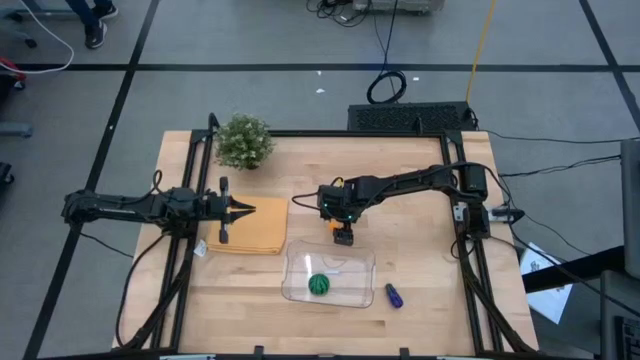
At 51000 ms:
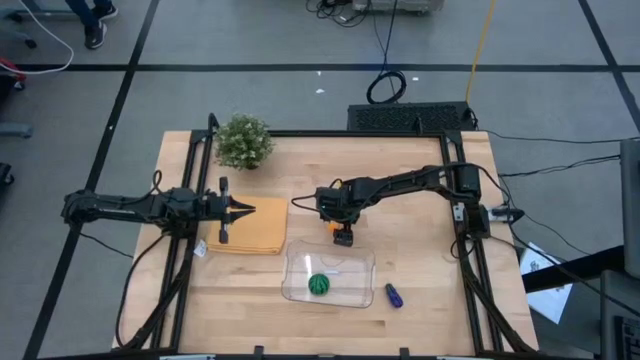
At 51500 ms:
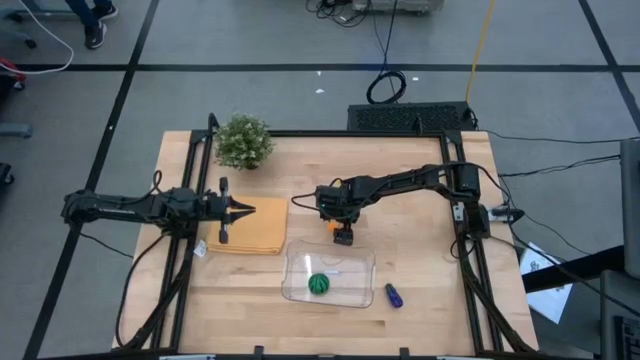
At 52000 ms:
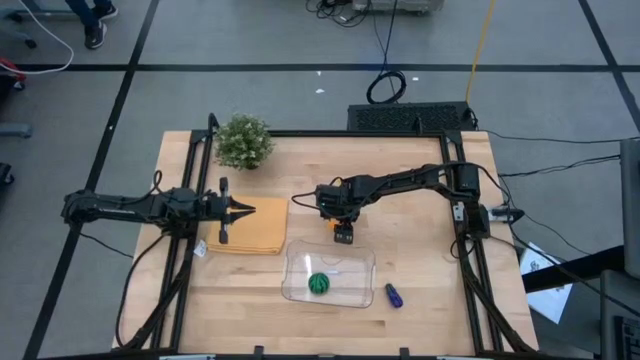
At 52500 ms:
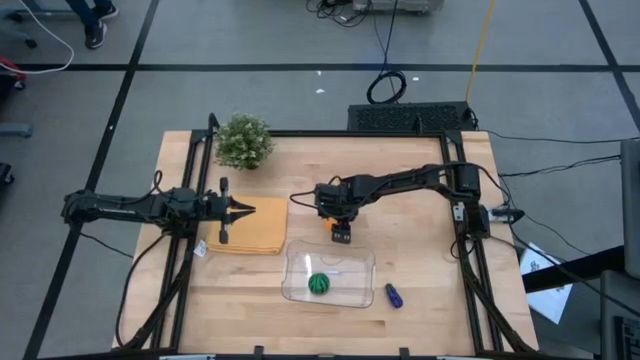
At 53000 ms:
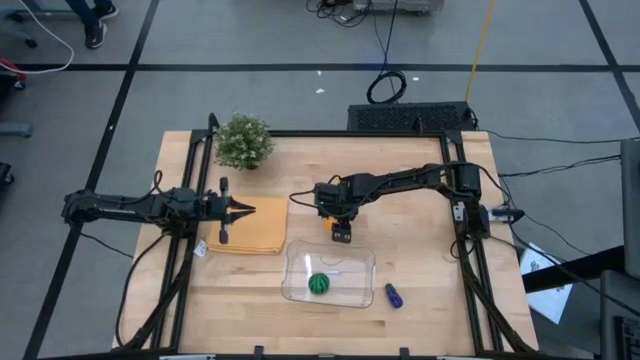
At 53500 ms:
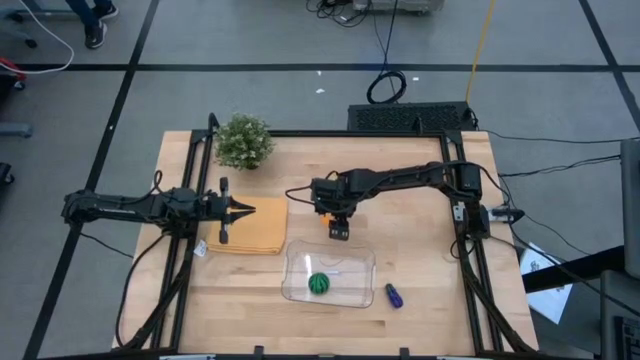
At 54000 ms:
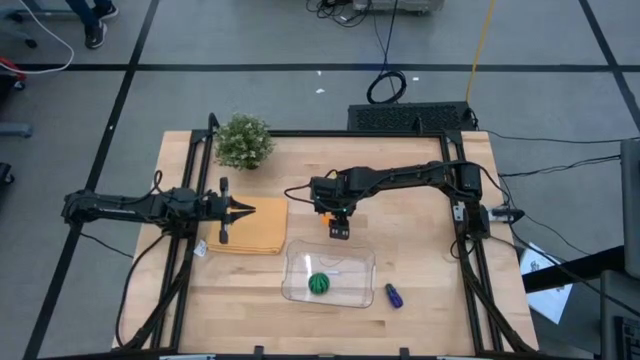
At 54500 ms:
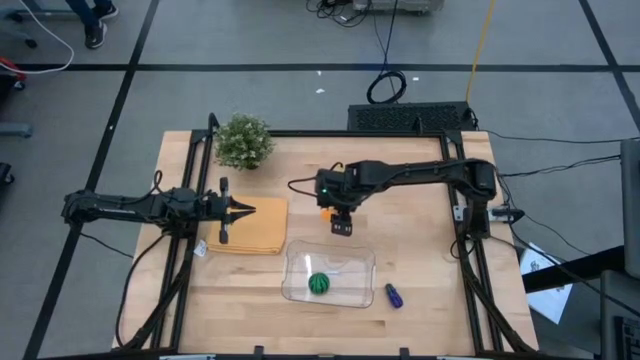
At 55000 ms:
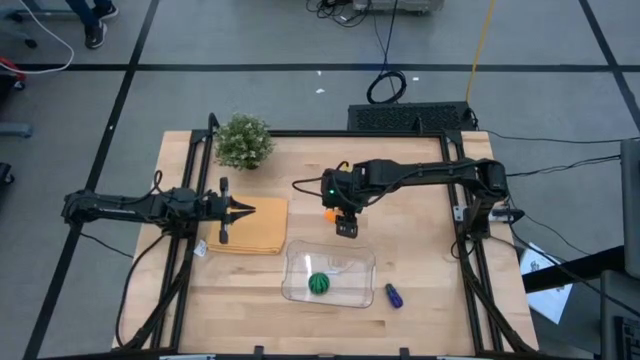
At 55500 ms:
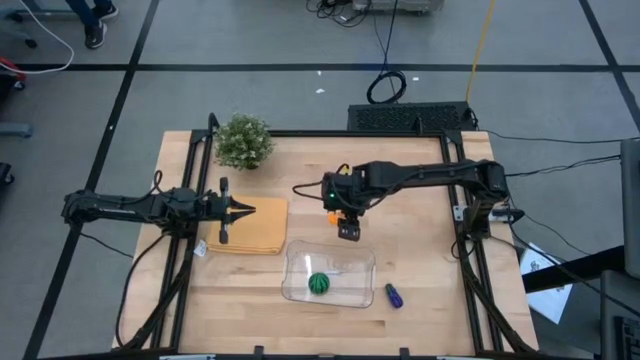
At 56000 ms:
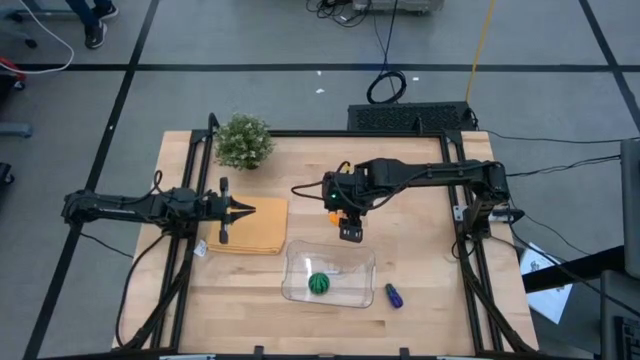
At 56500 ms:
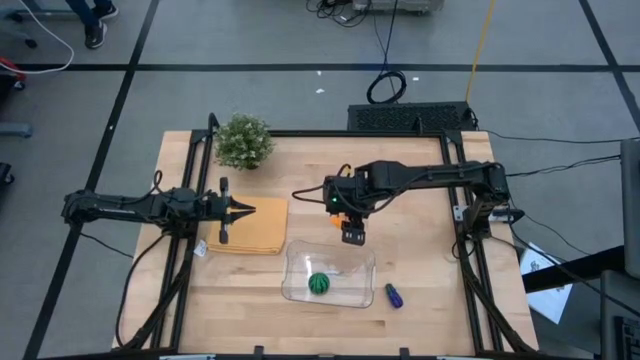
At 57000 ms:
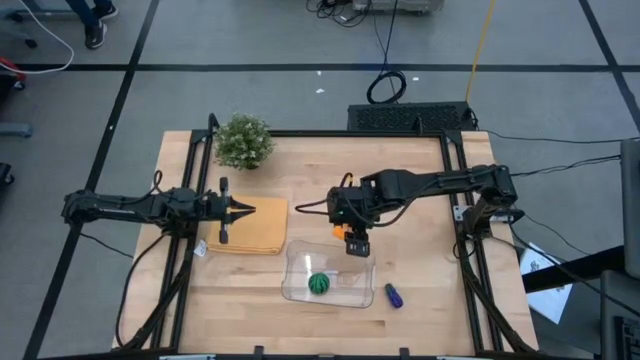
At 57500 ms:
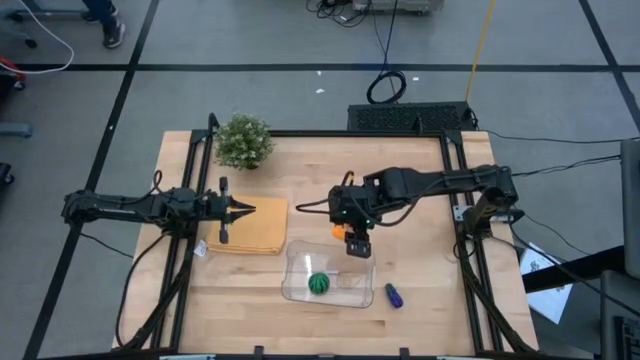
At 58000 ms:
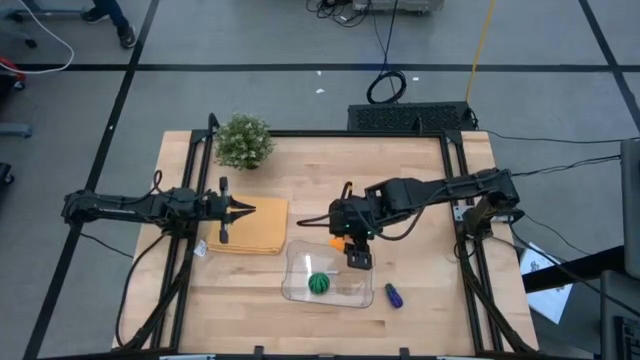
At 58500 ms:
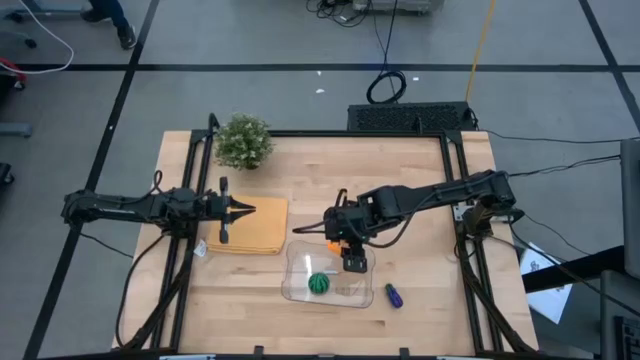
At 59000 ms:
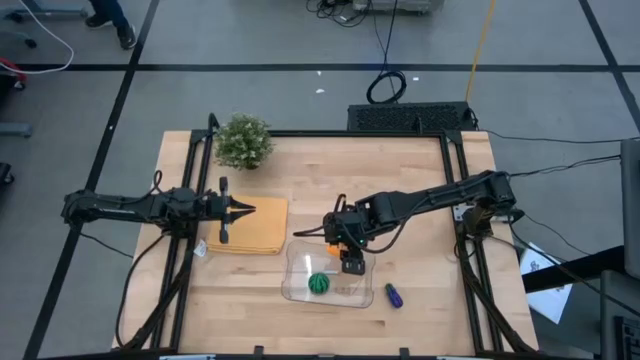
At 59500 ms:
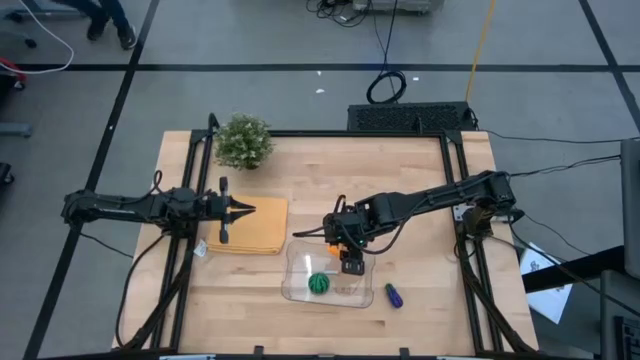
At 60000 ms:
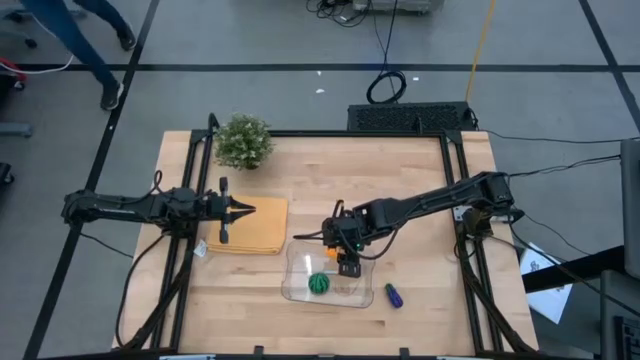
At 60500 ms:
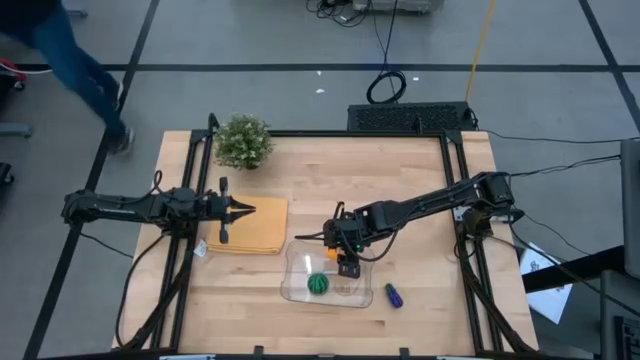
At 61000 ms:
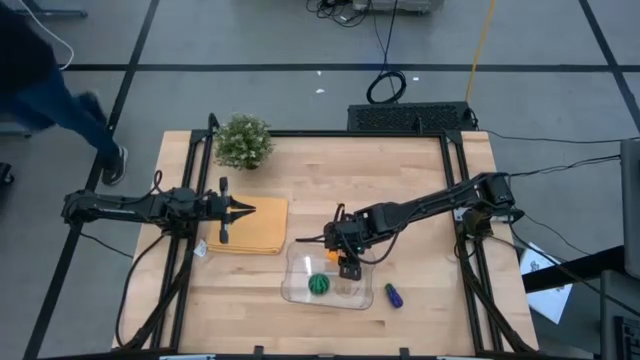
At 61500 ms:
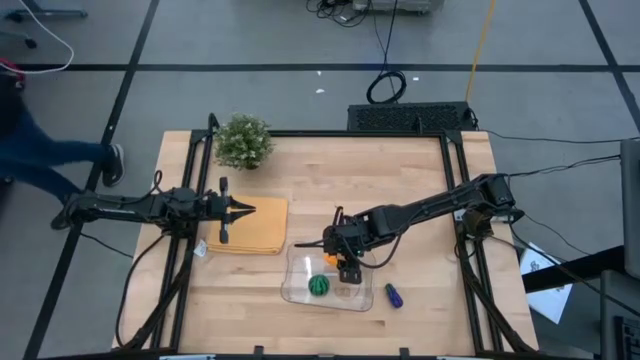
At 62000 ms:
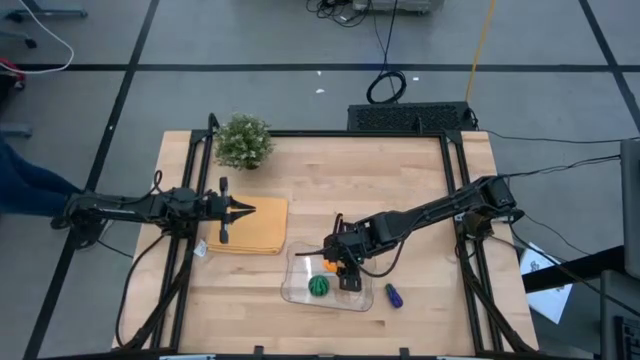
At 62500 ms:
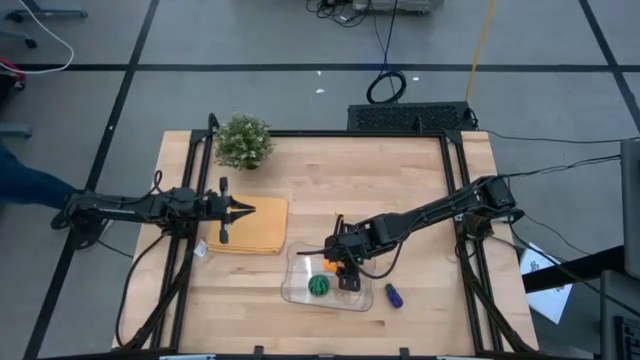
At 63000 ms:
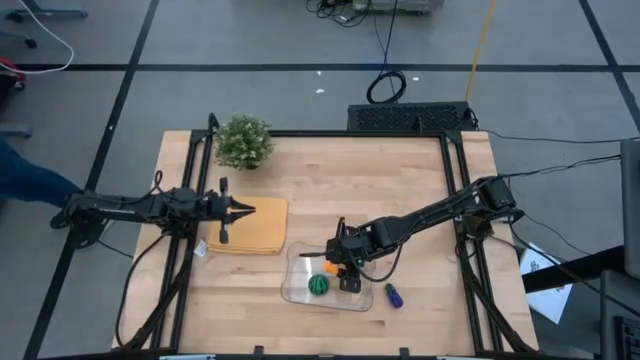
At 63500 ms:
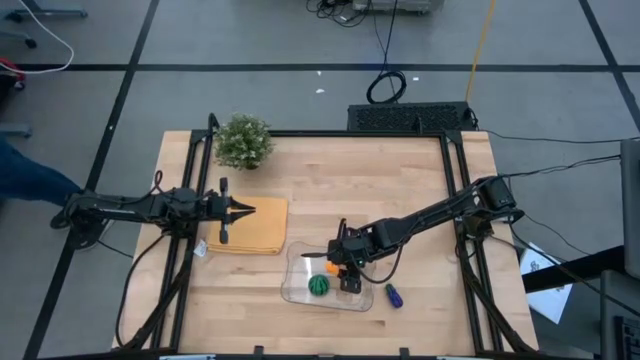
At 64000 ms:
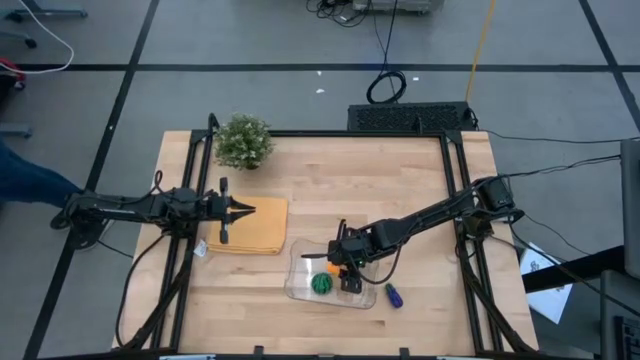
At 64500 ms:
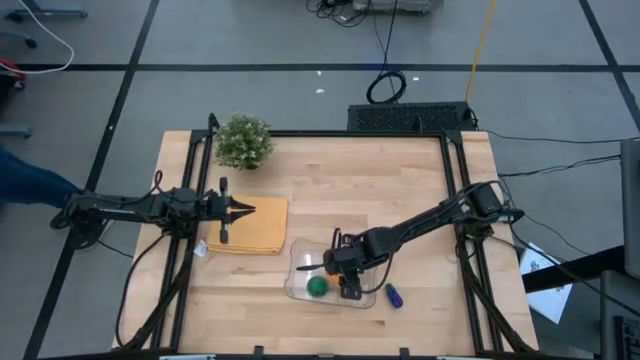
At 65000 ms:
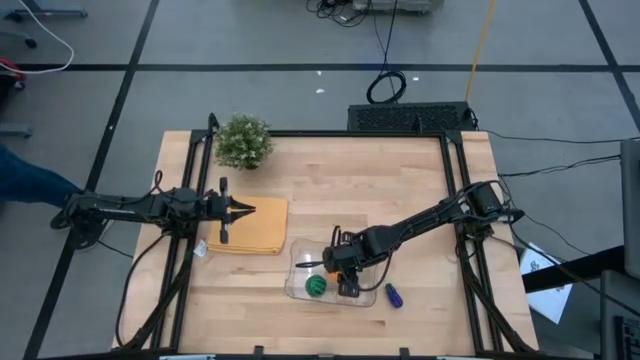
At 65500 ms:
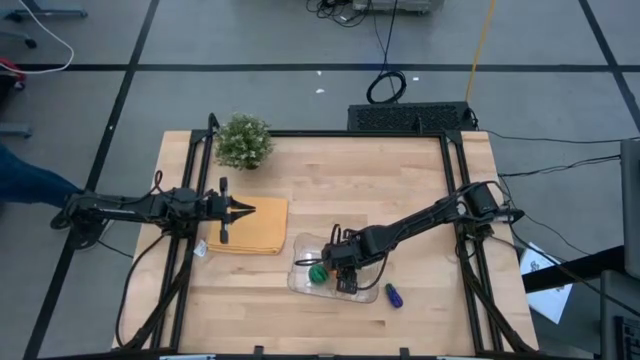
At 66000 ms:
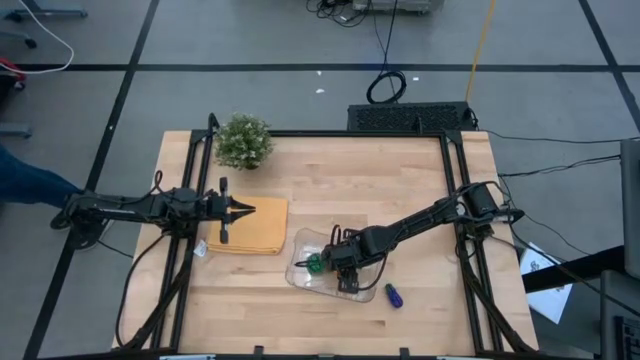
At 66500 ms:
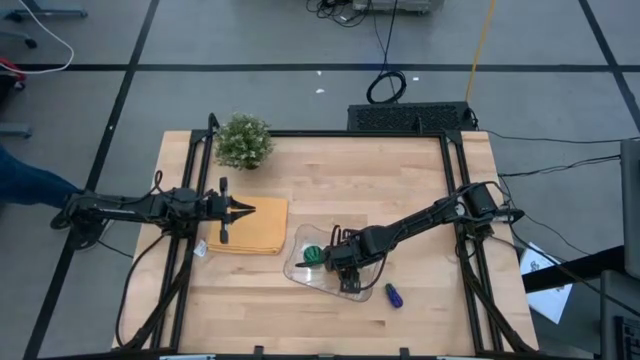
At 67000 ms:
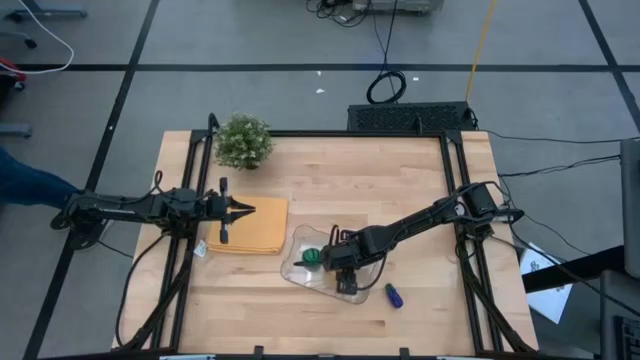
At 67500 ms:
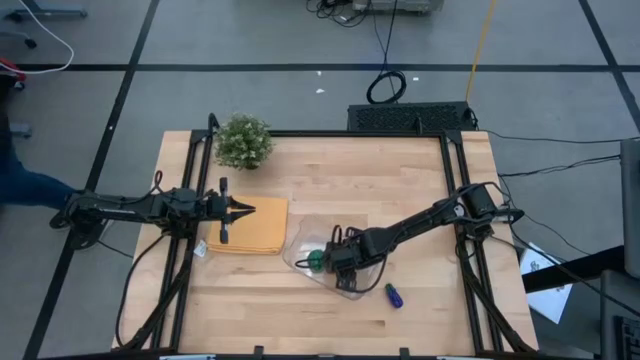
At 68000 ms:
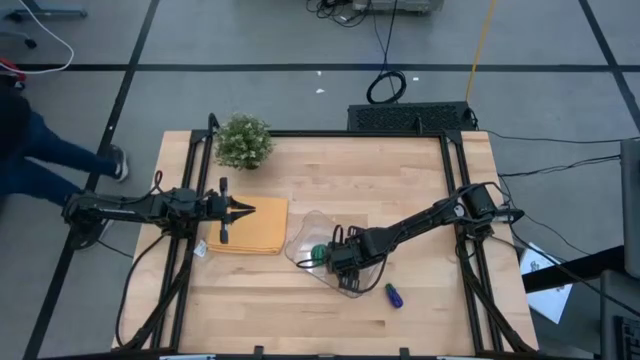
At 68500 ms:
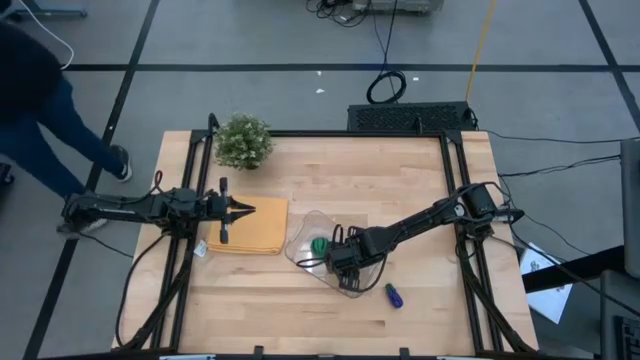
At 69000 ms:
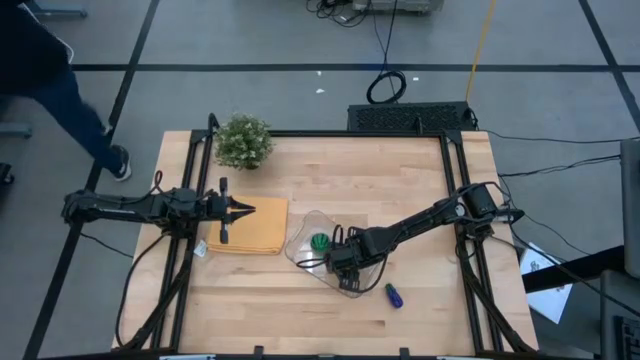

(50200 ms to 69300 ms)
Task: Pick and placing Produce into tupperware
Put the light orange croissant into the transparent bin

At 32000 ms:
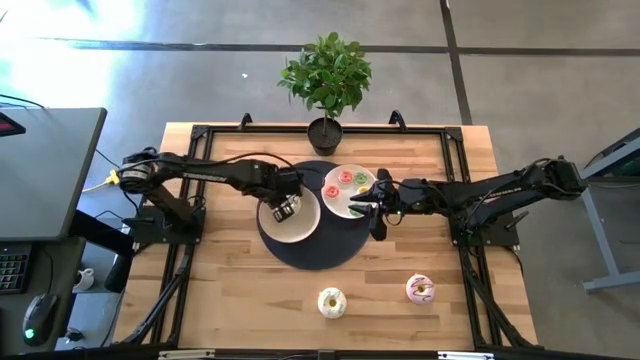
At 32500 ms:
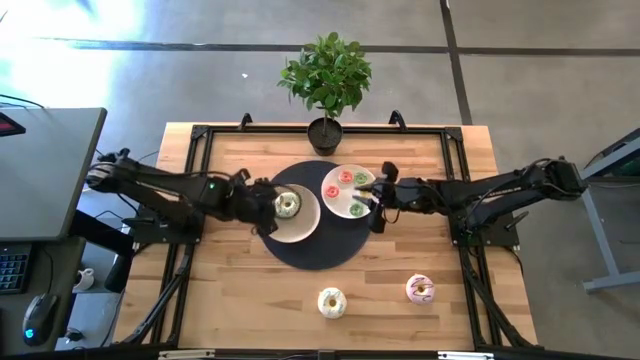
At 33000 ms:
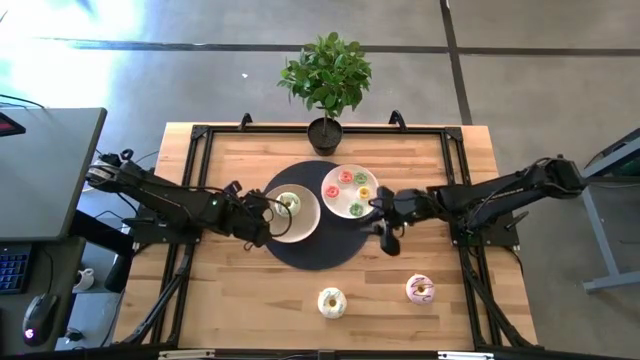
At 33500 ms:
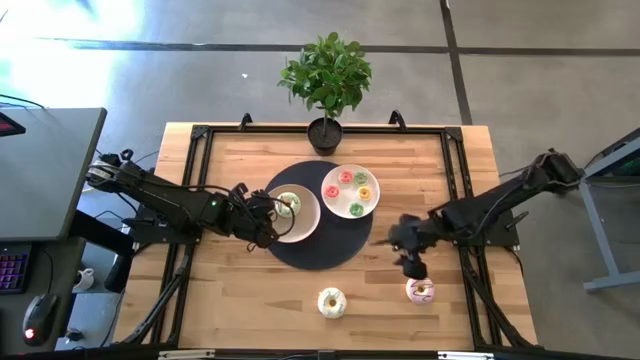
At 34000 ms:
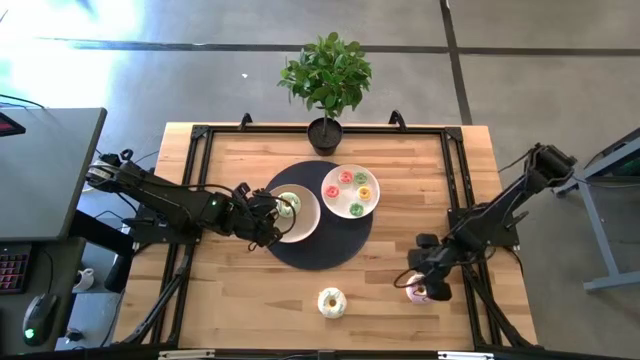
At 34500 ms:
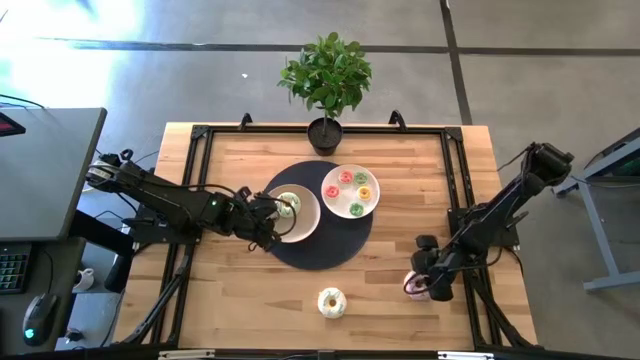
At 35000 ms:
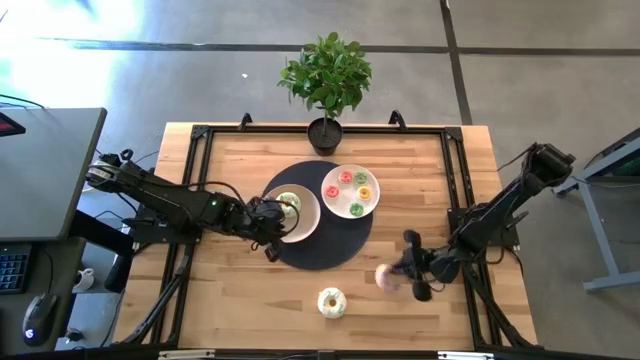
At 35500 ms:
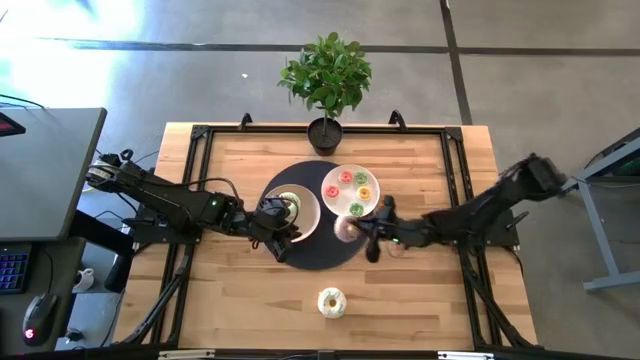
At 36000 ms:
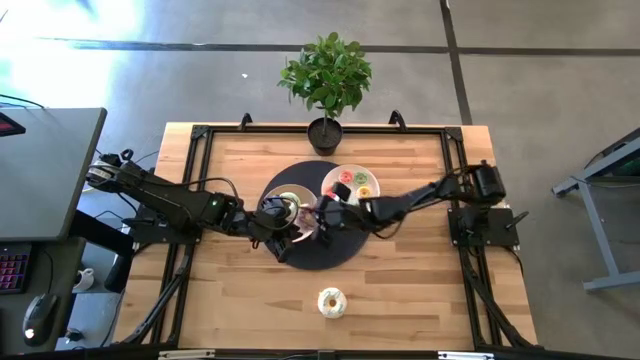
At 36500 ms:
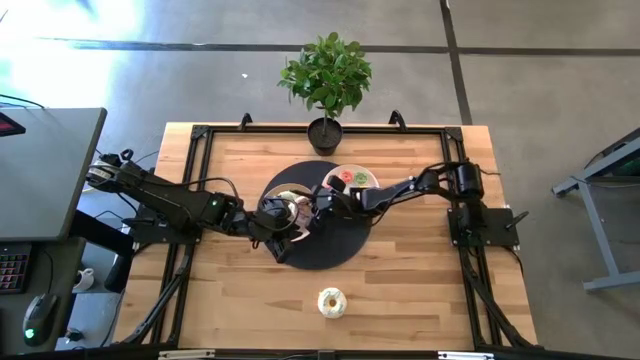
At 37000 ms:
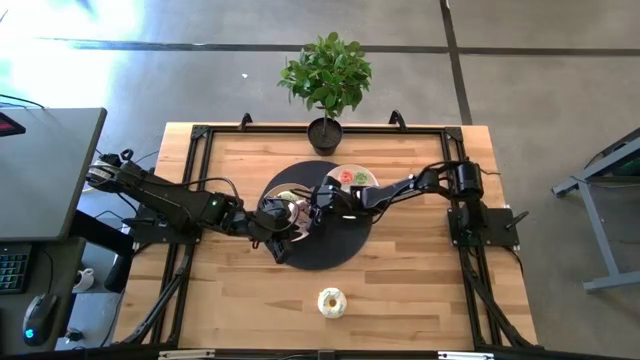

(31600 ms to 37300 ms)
Task: Pick & Place donuts
Put the big purple donut on the left white plate
